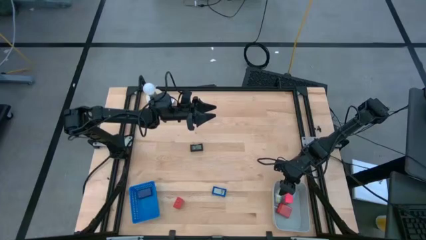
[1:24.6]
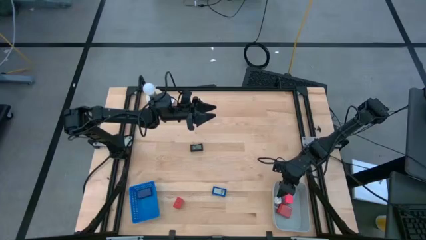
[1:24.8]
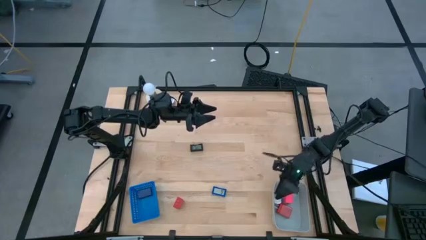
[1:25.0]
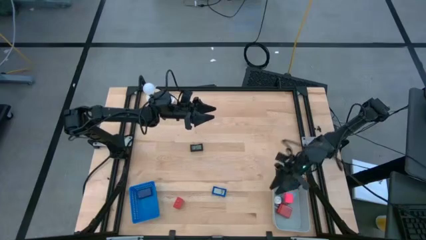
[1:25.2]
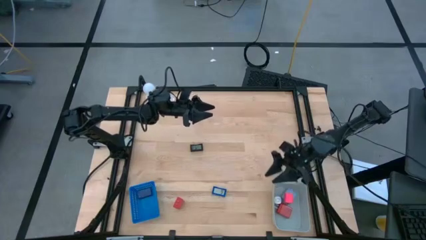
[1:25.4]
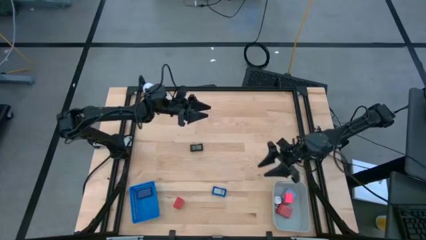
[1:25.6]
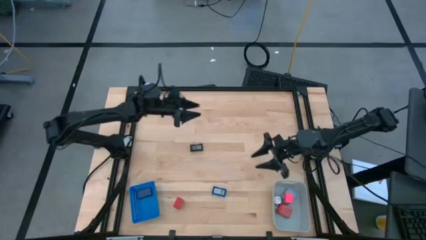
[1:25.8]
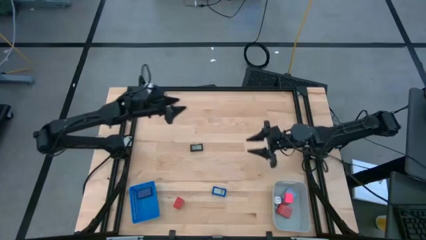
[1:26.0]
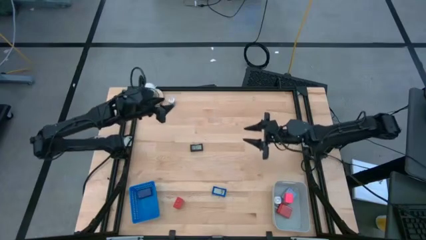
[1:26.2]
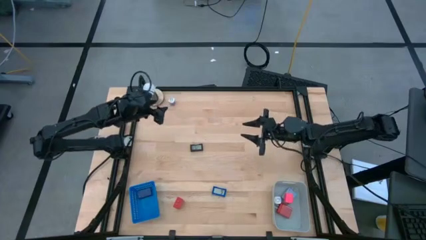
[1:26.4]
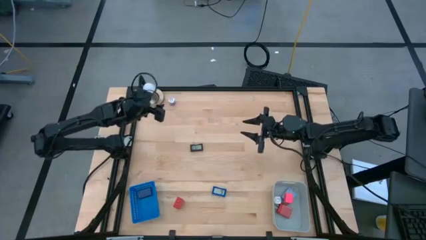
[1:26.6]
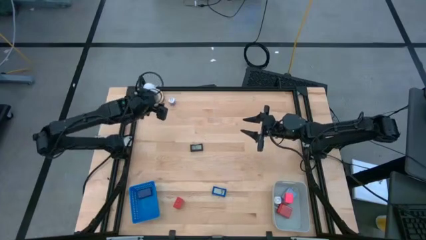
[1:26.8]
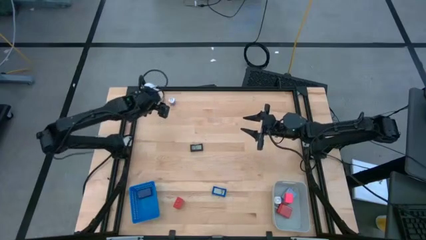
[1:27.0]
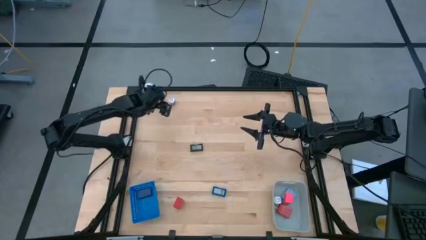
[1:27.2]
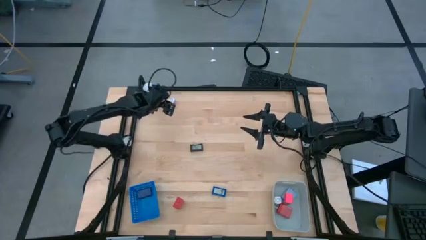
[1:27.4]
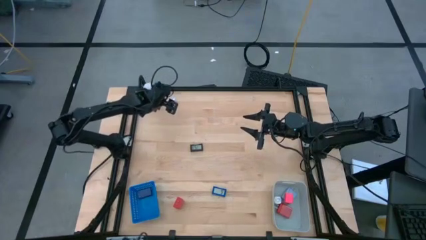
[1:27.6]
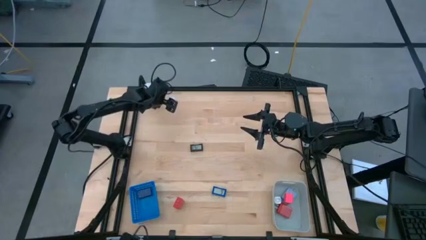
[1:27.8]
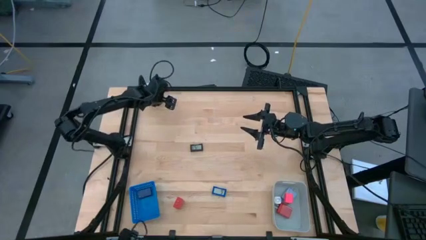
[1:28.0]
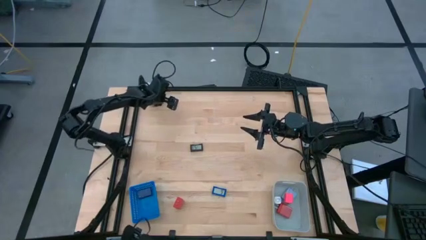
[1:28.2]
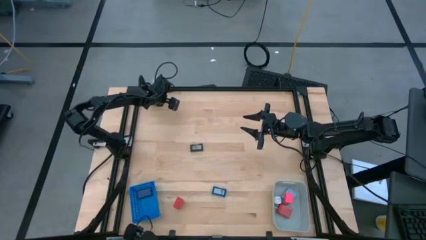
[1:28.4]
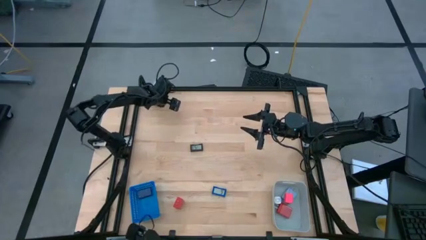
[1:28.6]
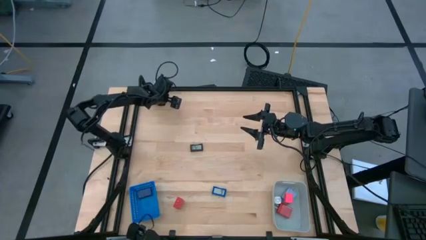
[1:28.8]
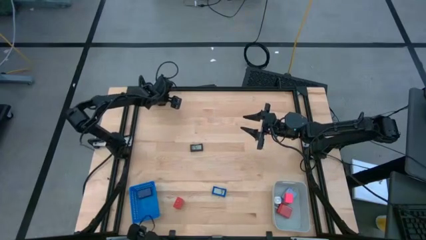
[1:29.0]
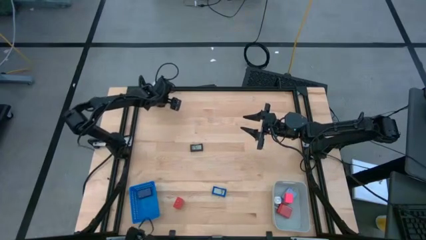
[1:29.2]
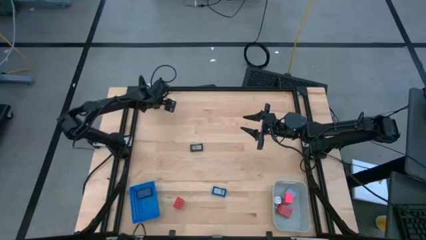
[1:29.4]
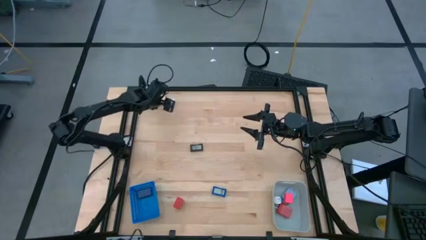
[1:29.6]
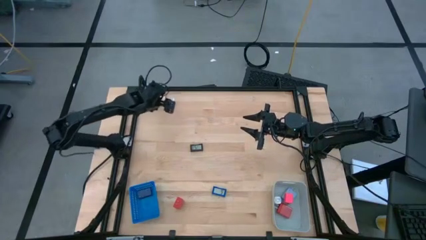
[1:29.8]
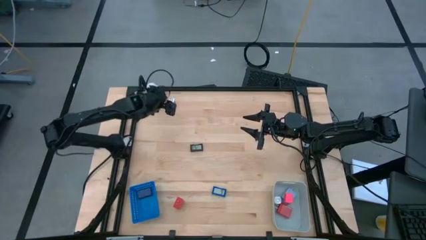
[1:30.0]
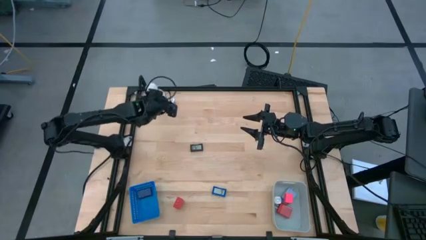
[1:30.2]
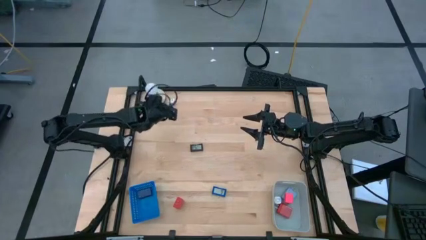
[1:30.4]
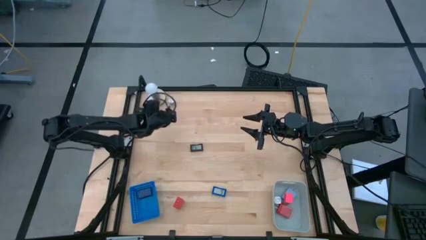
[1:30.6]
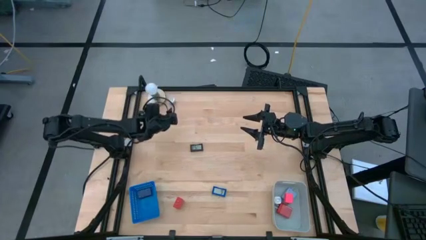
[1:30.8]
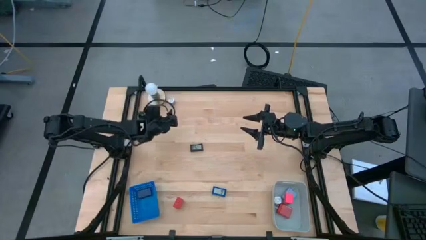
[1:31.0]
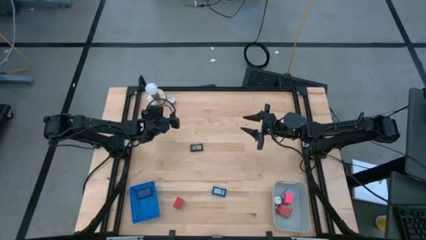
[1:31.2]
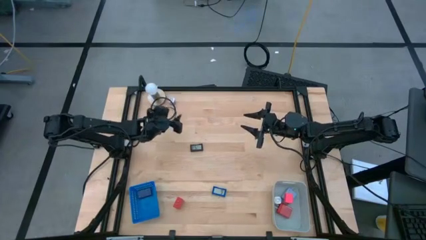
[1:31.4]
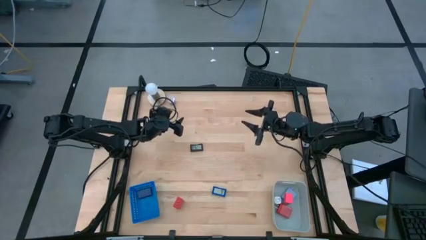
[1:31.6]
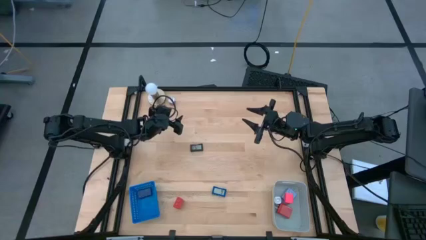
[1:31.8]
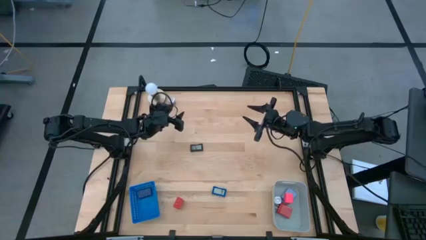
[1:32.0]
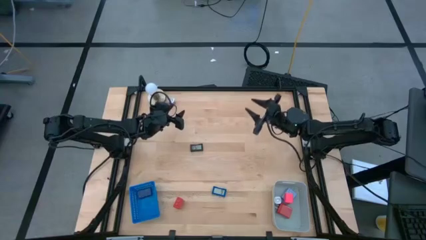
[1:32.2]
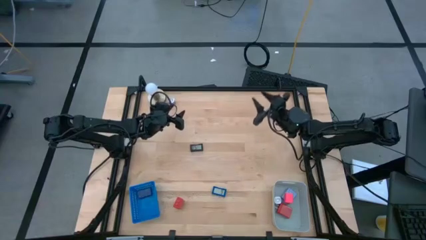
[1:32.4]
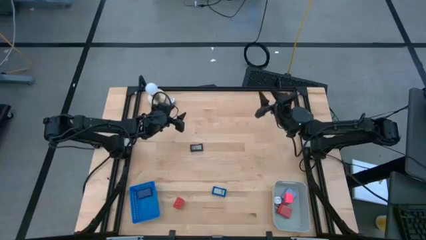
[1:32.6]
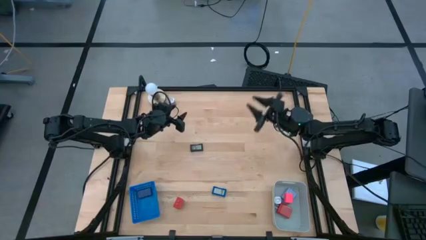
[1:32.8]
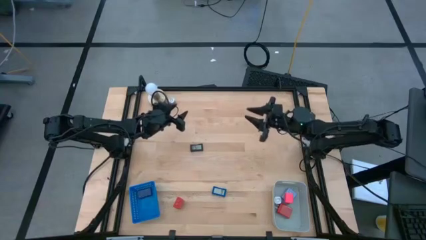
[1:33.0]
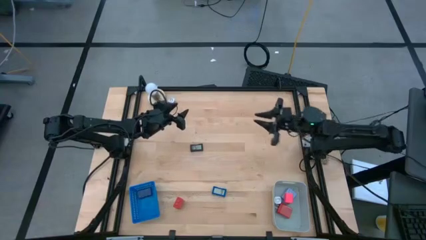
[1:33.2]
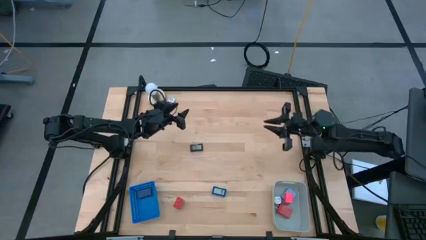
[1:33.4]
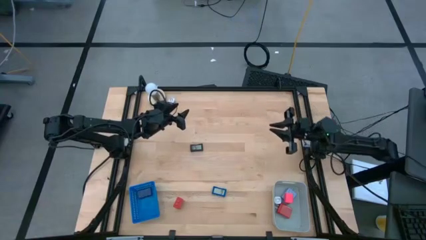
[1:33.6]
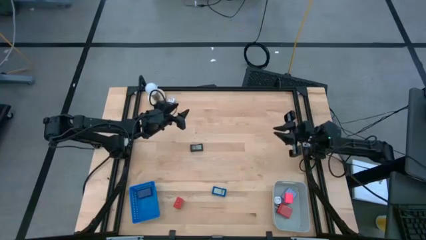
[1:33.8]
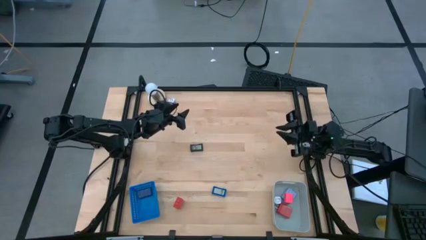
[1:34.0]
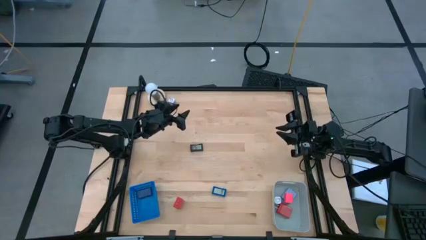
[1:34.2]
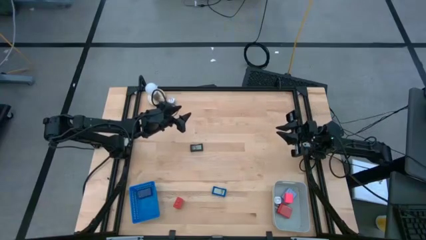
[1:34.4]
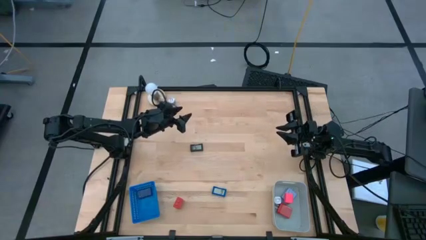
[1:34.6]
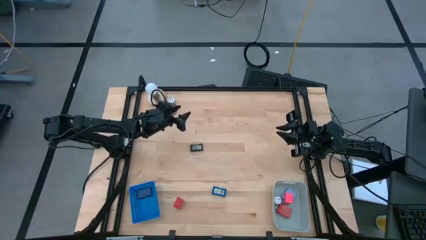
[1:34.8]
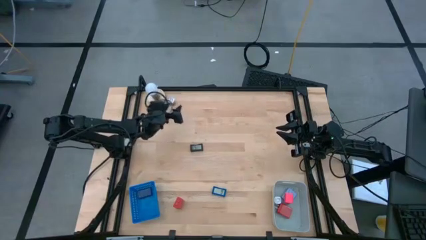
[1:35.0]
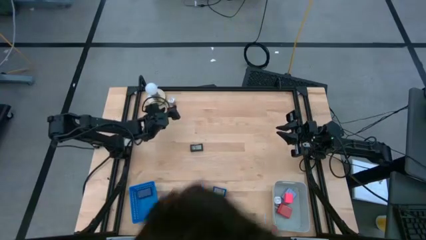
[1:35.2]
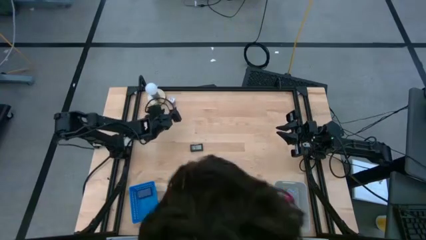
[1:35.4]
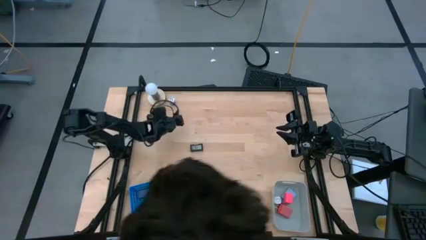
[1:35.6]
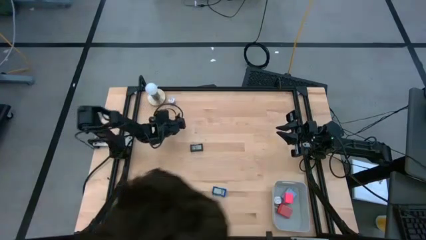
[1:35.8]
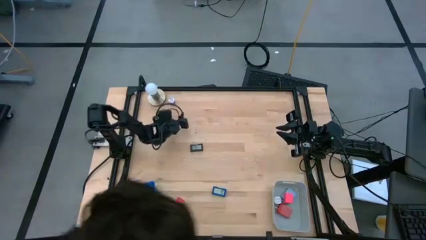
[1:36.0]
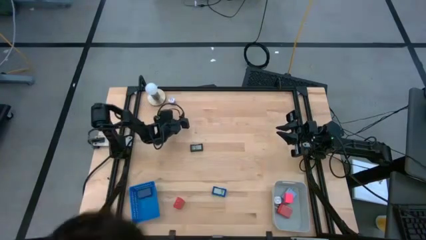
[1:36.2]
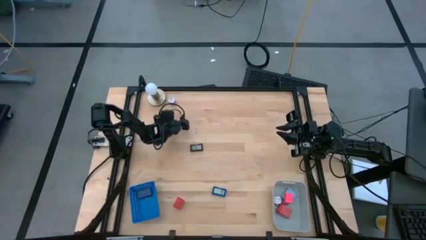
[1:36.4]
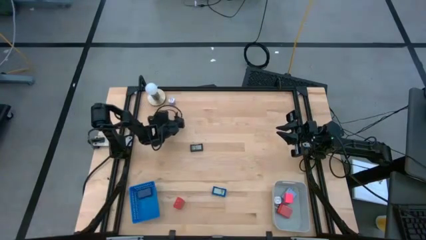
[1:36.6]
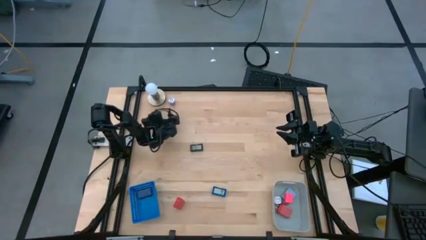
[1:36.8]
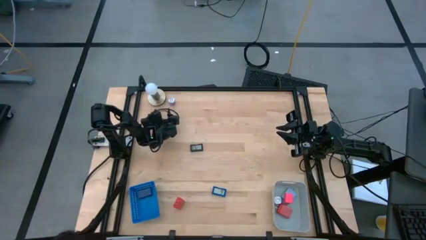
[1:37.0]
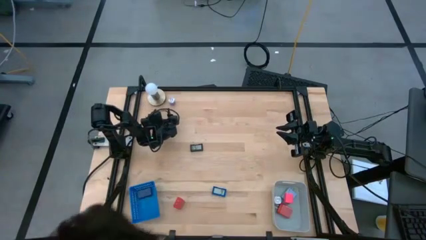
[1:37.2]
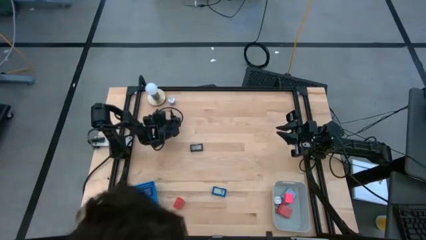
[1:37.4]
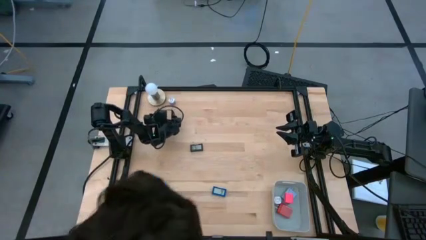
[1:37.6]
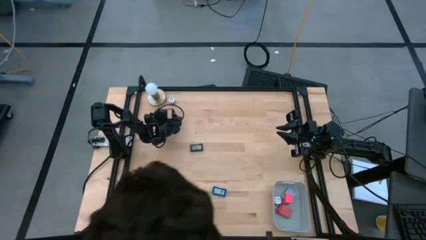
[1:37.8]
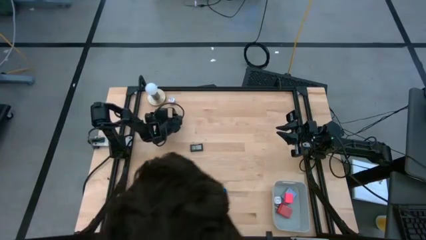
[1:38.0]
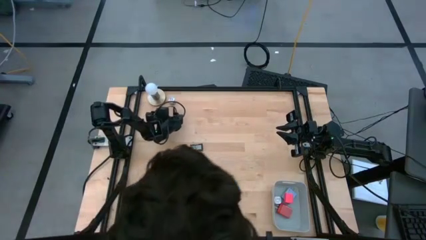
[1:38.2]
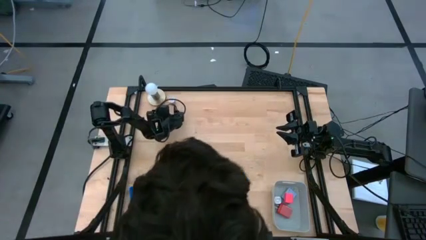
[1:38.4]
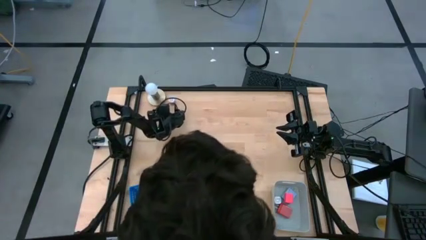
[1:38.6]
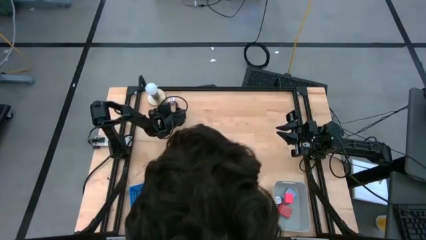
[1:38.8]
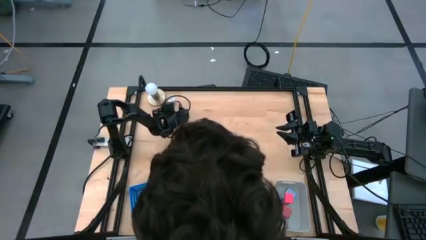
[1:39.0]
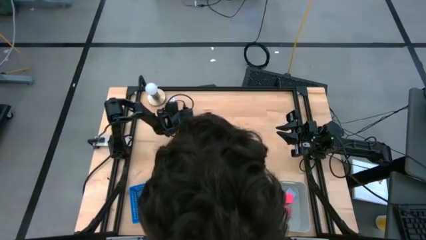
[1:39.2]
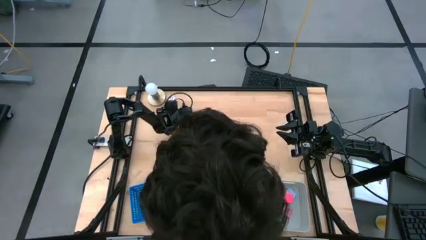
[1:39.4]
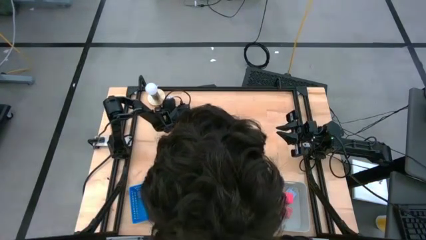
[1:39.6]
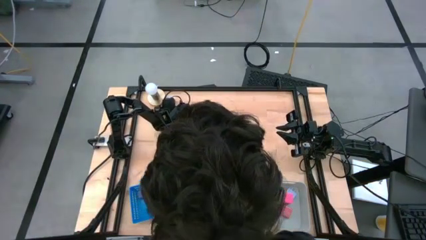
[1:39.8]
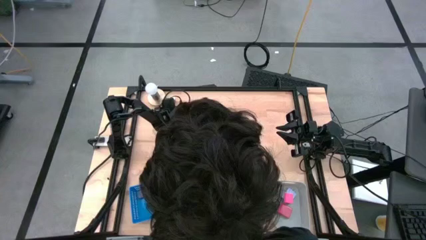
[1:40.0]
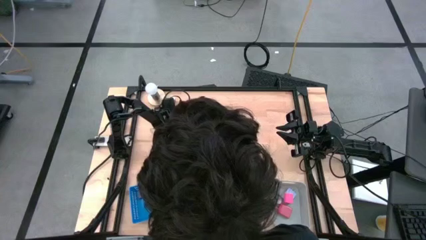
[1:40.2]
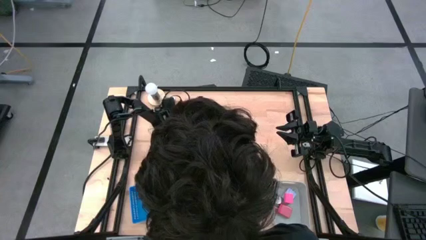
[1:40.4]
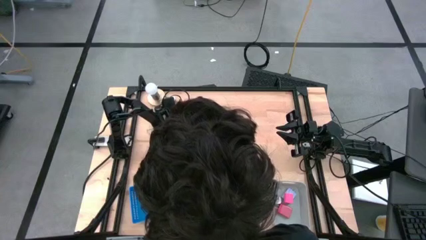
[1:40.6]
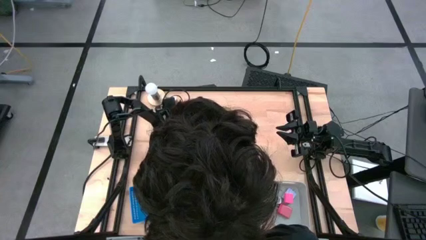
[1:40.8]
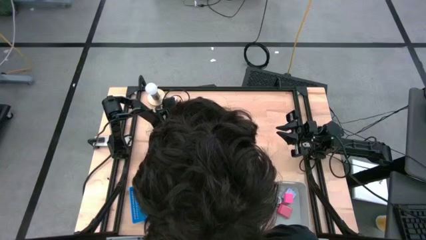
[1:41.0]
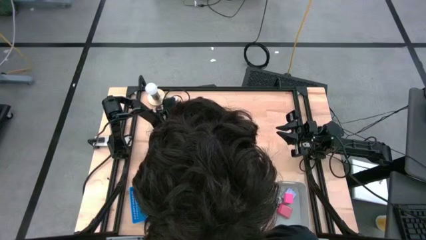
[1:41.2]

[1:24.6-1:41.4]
Task: Pick & Place Office items
Put the purple charger adapter into the gray bin
